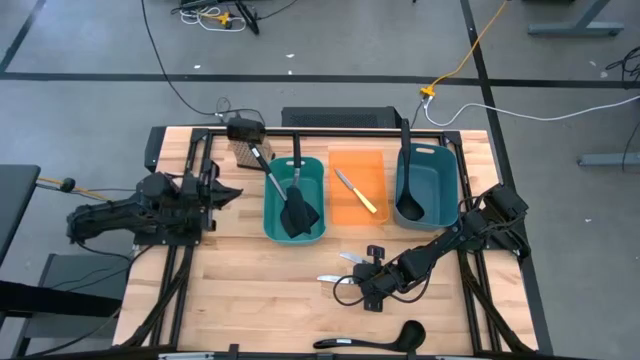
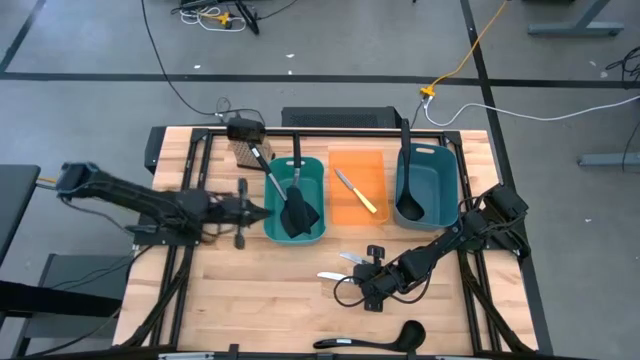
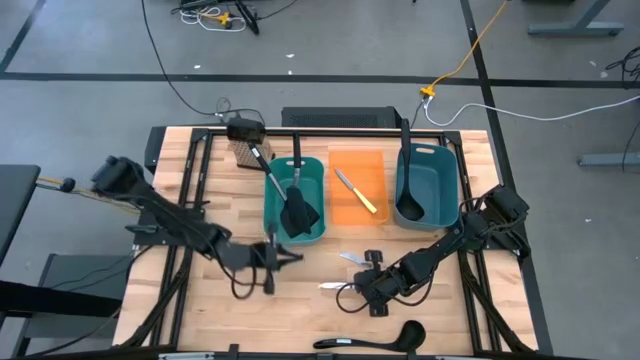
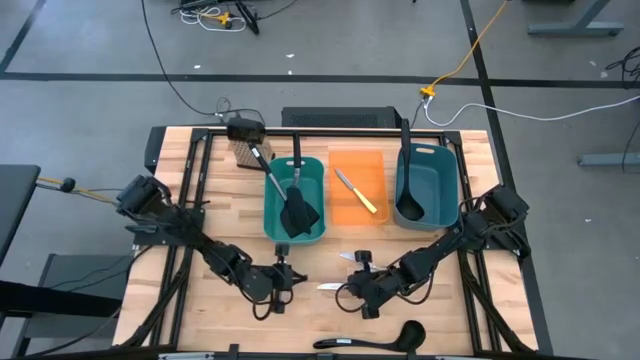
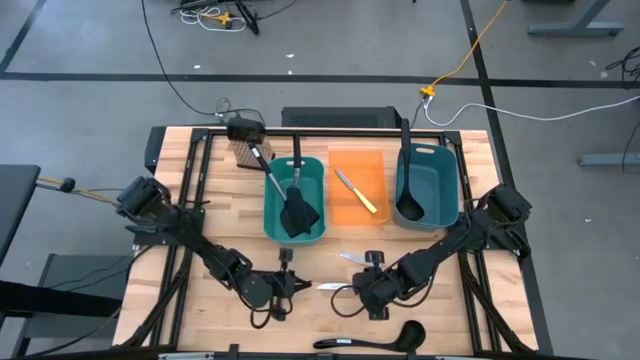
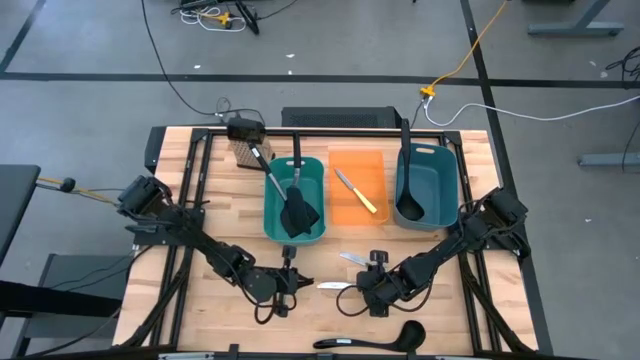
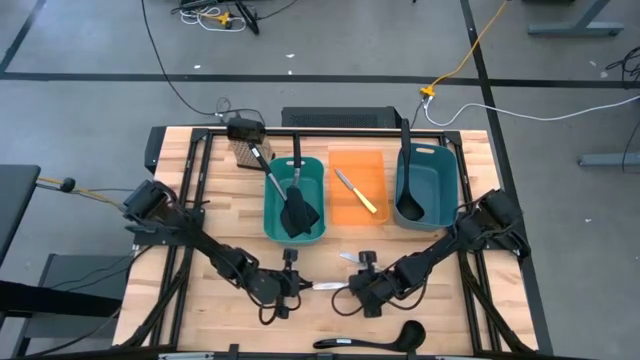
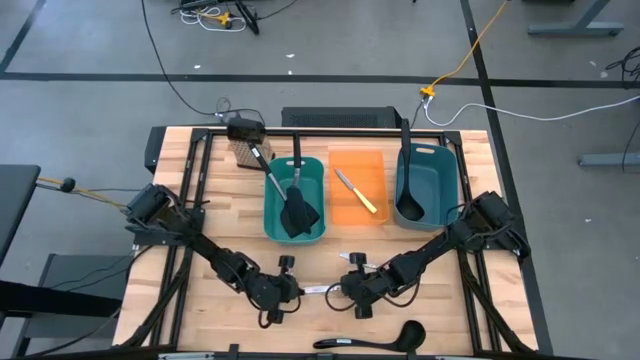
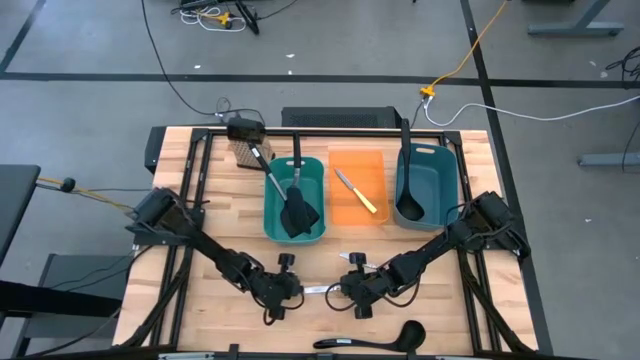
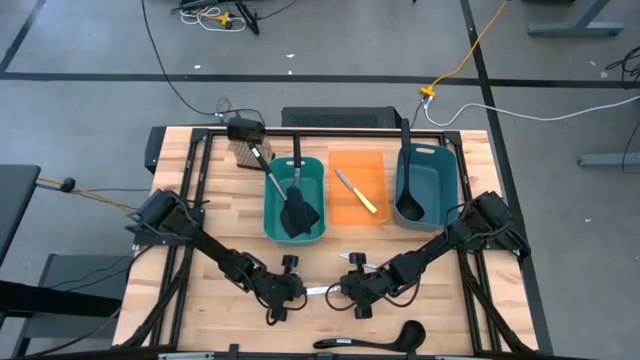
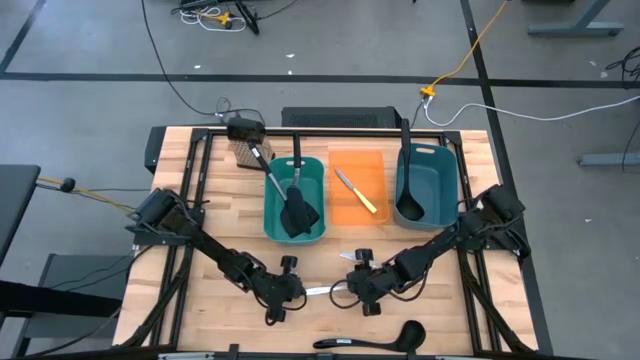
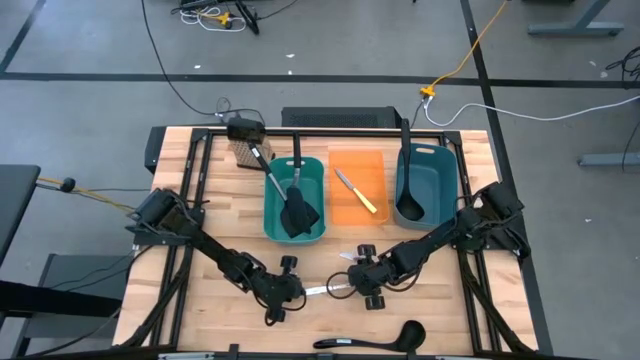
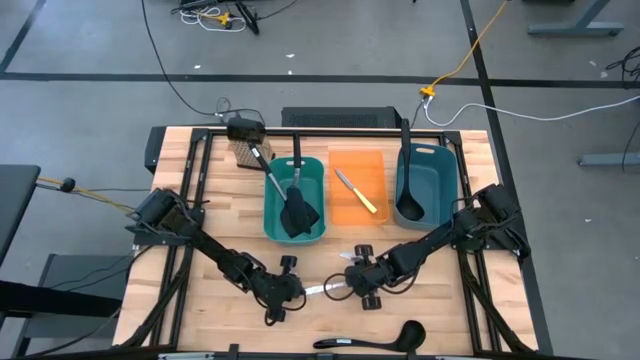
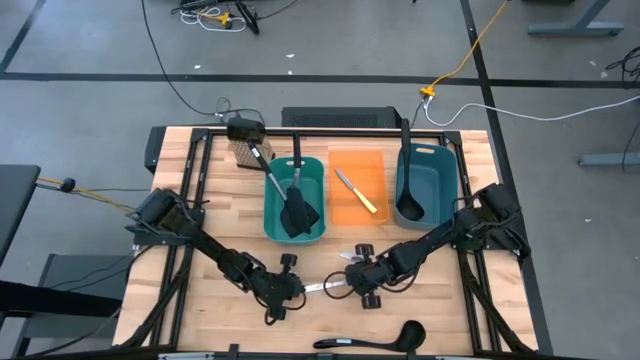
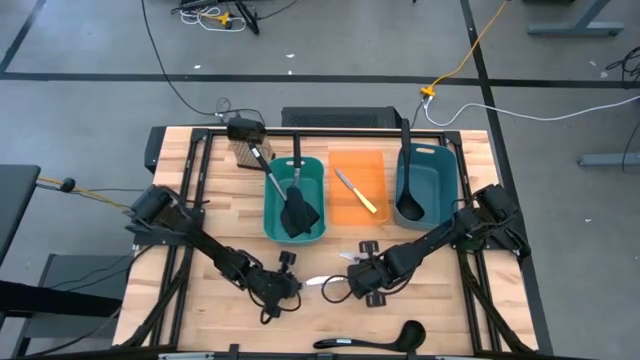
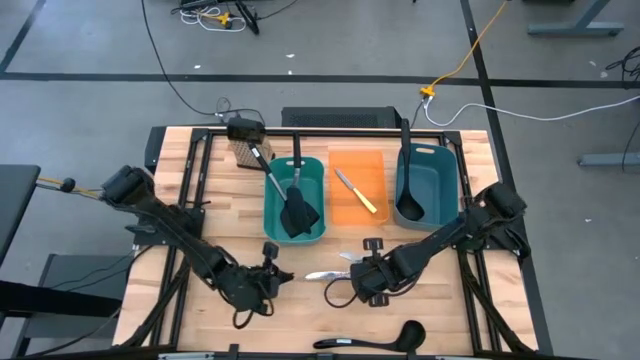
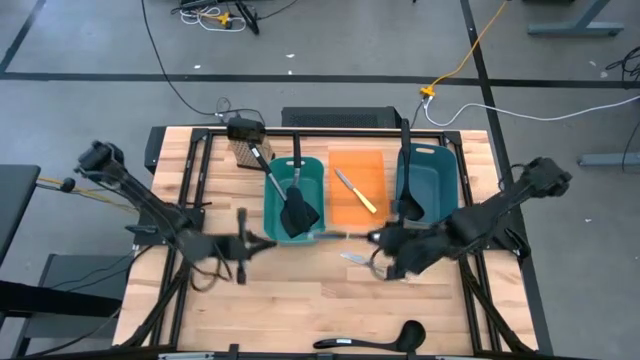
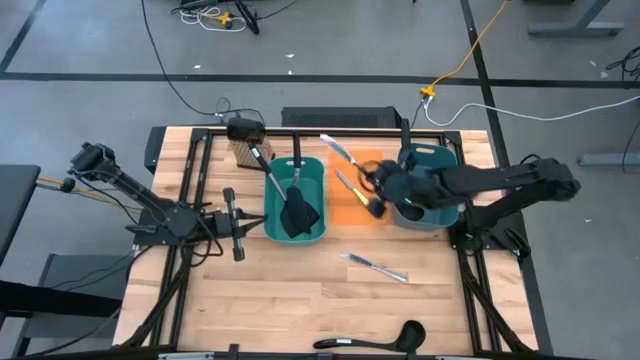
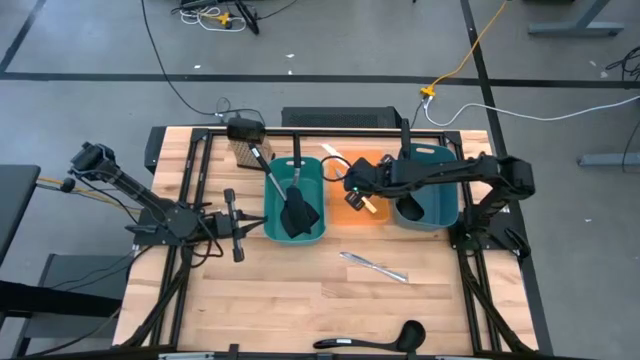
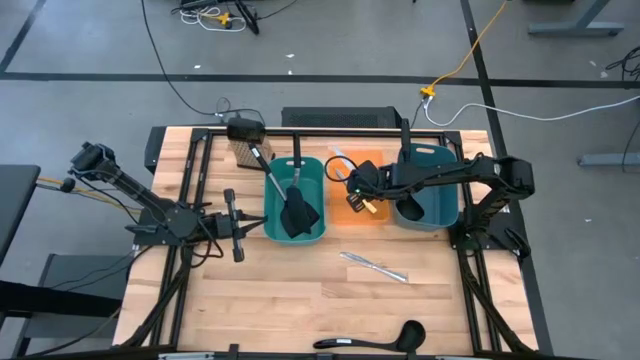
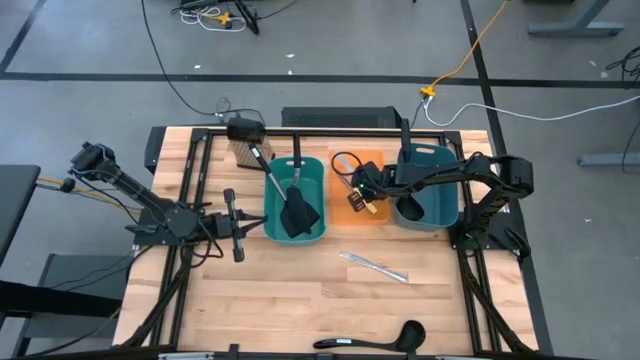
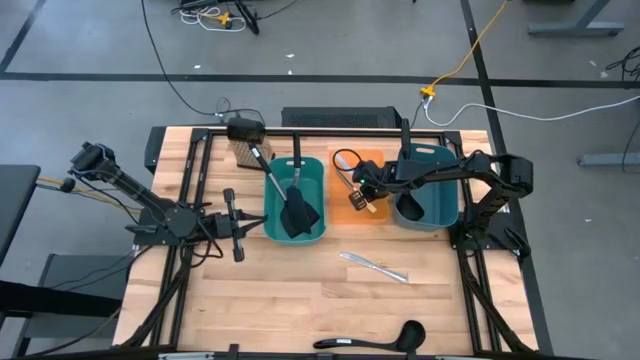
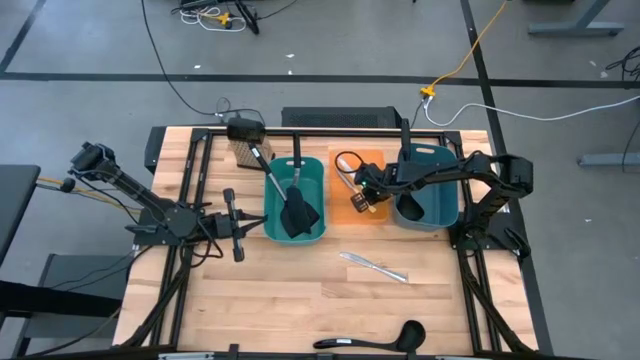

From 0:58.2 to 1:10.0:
Task: Pick & Place Kitchen Items
Put the bottom silver table knife into the orange bin

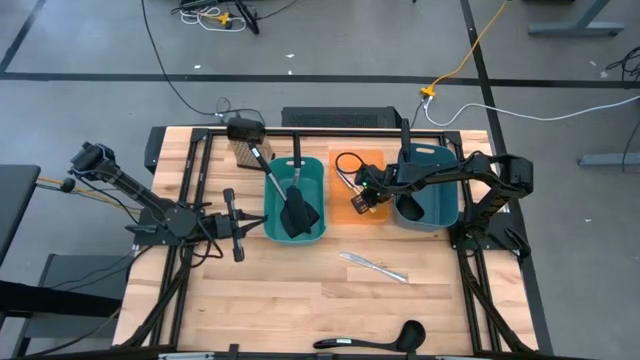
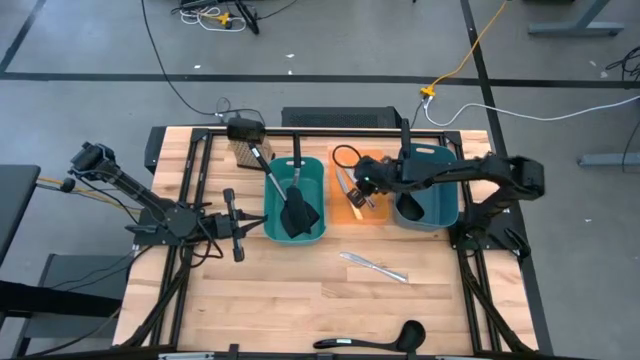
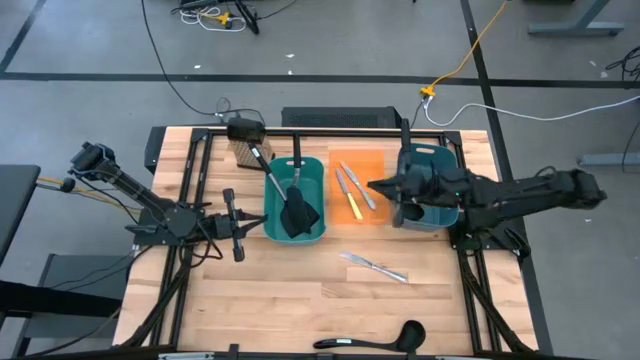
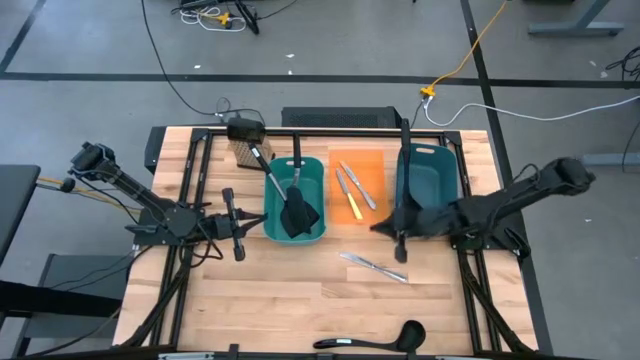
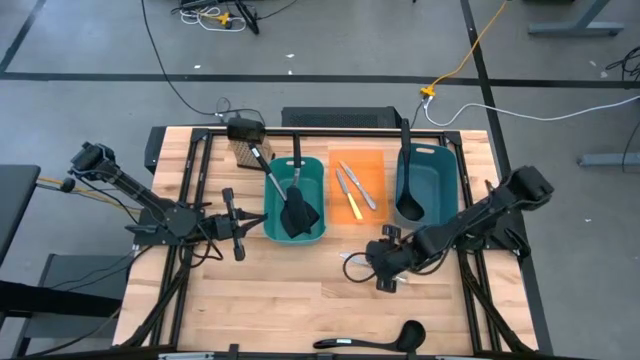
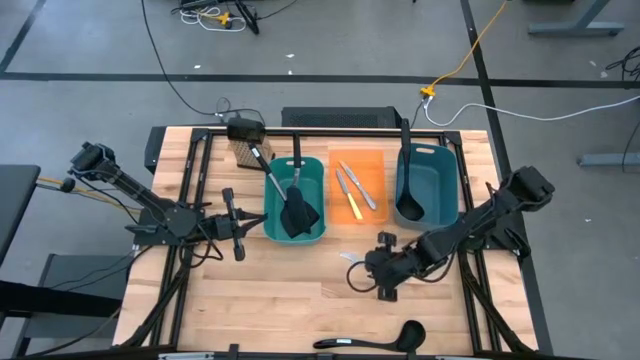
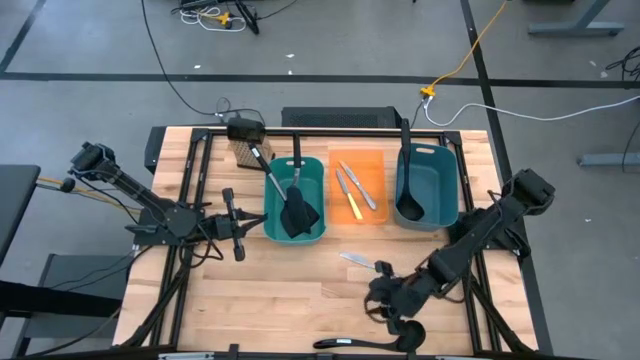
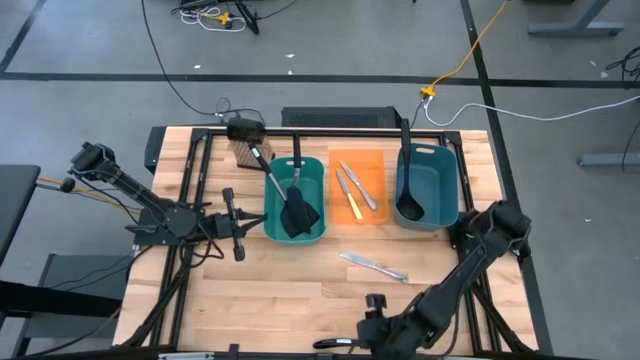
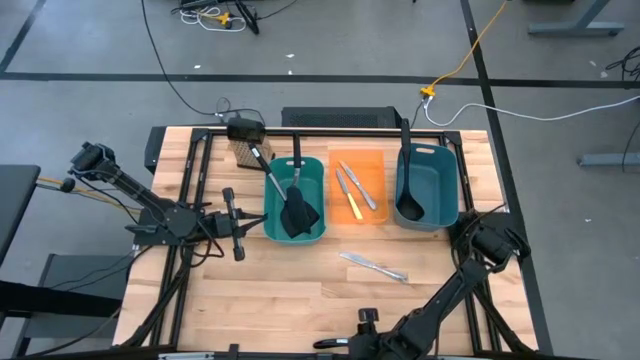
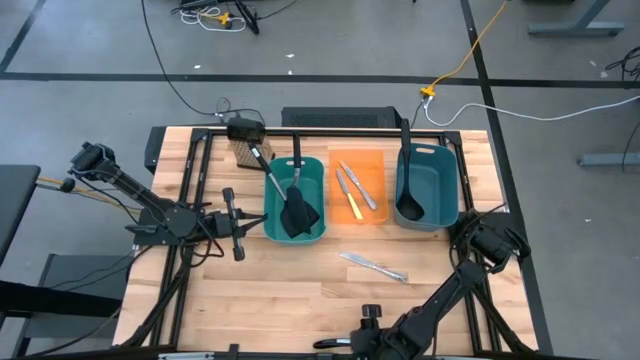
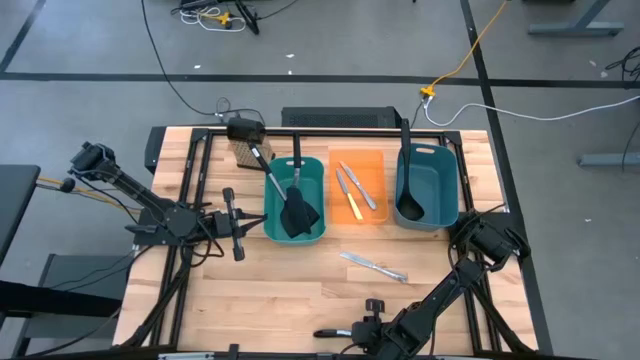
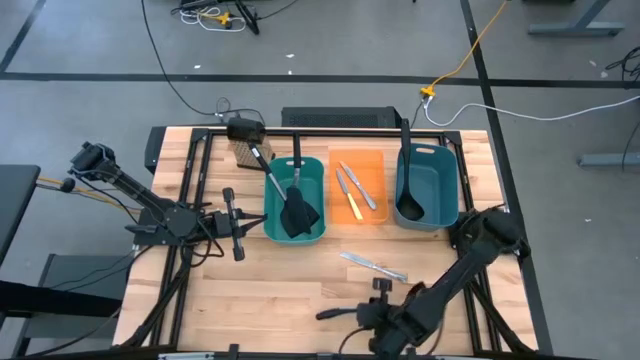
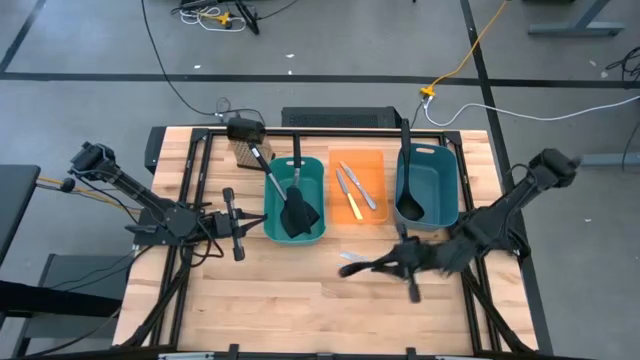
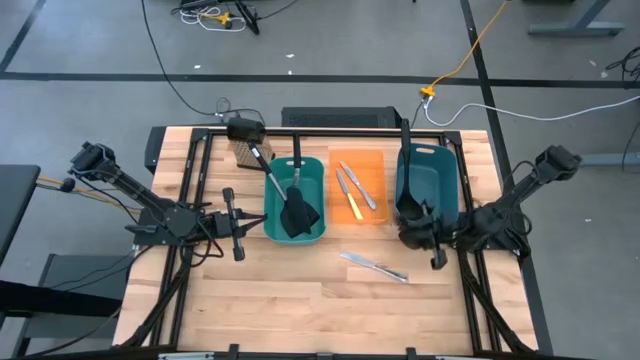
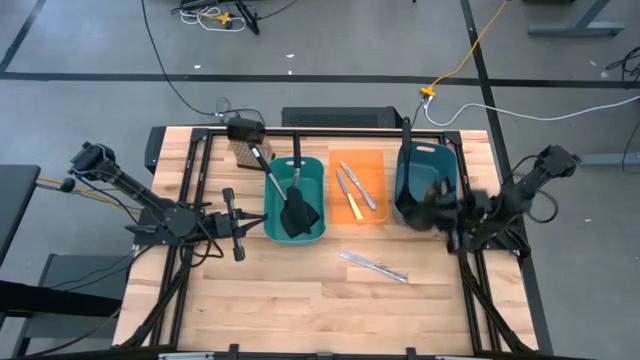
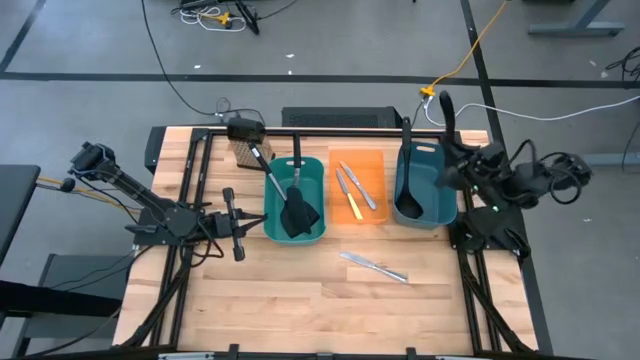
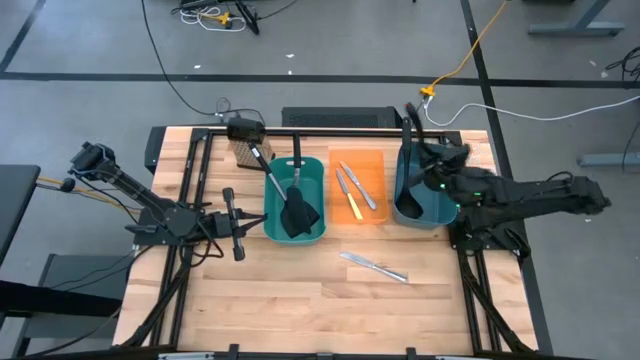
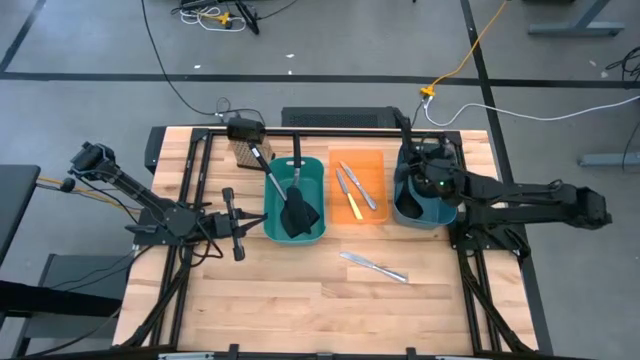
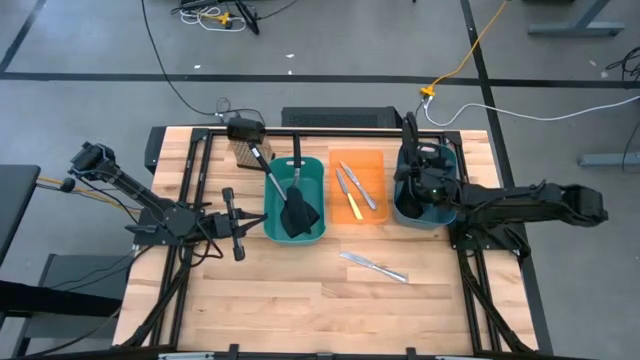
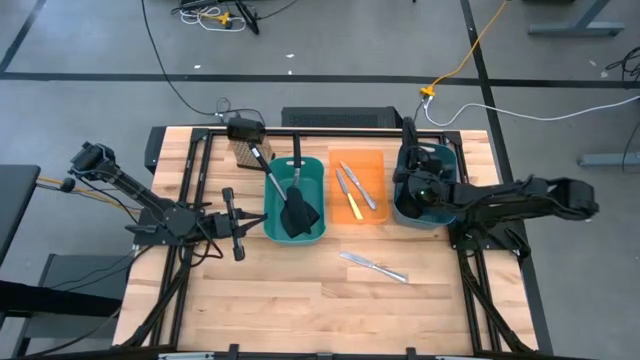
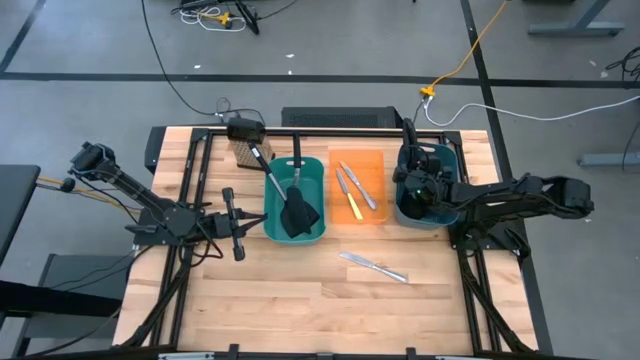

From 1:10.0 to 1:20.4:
Put the black serving spoon into the dark blue bin
